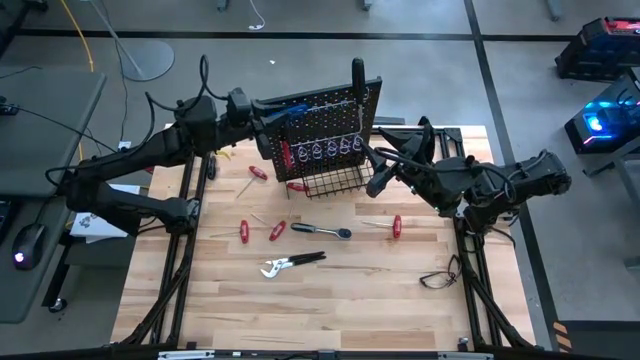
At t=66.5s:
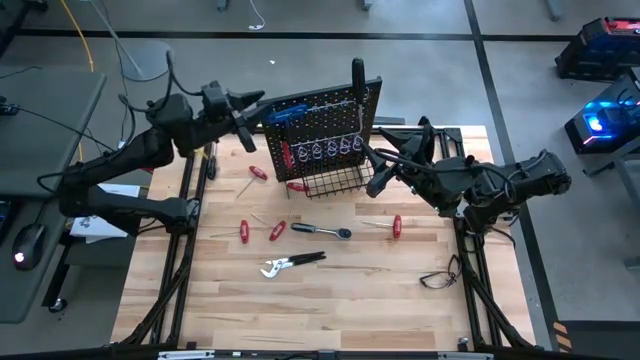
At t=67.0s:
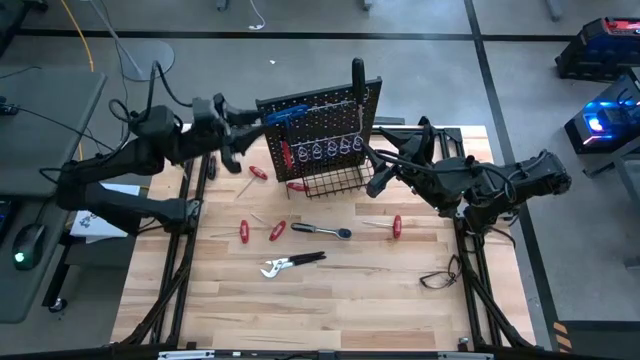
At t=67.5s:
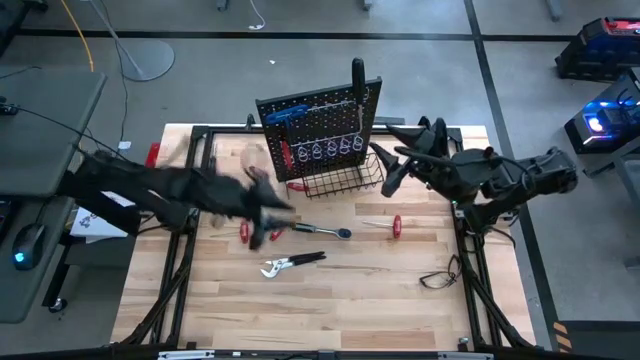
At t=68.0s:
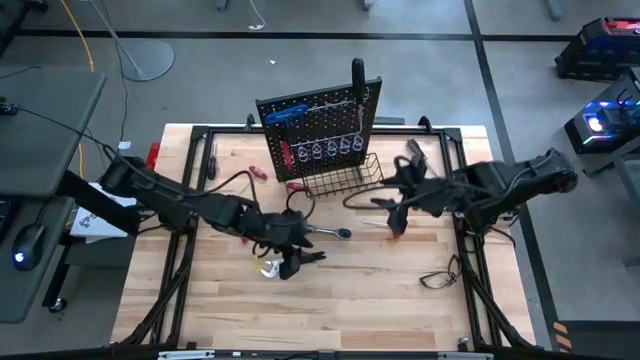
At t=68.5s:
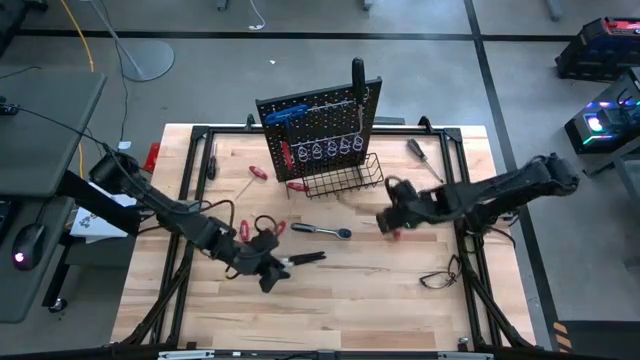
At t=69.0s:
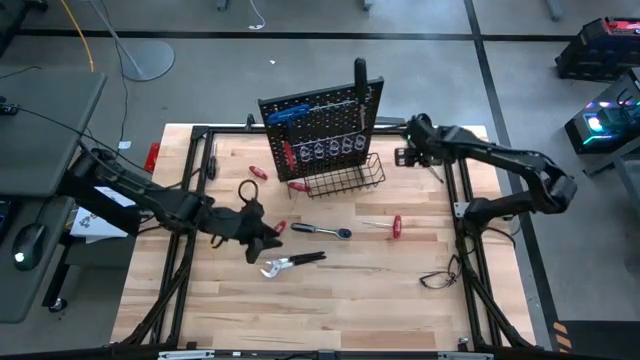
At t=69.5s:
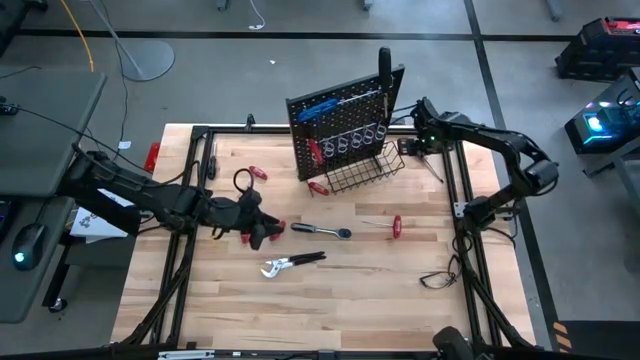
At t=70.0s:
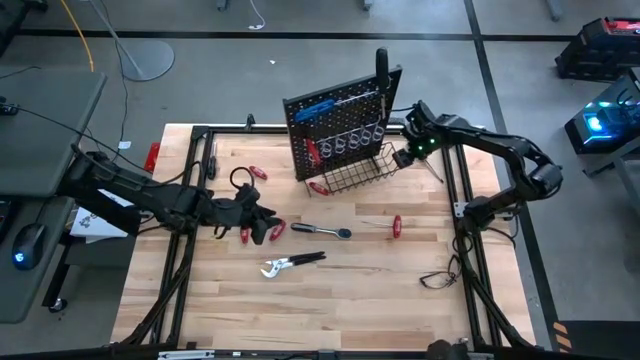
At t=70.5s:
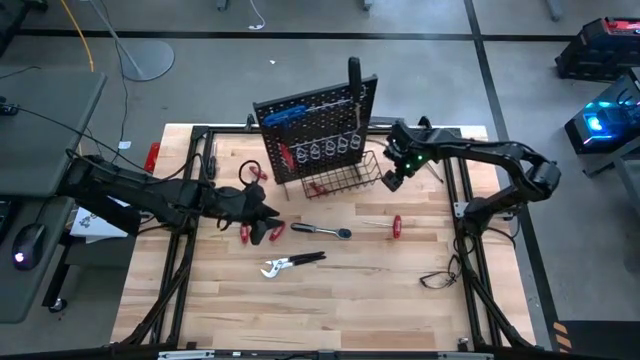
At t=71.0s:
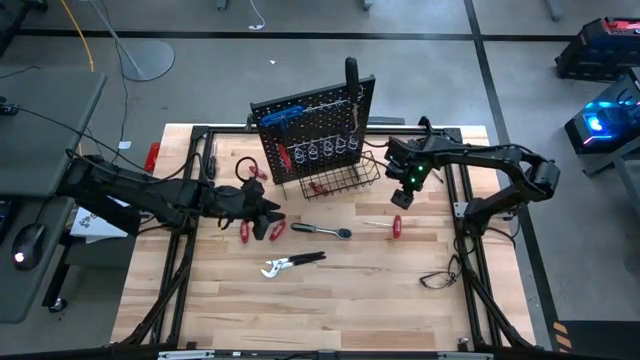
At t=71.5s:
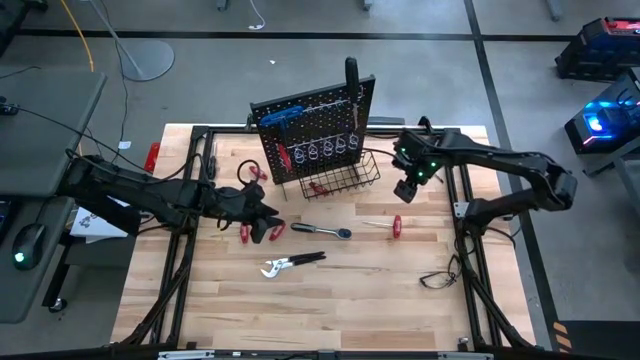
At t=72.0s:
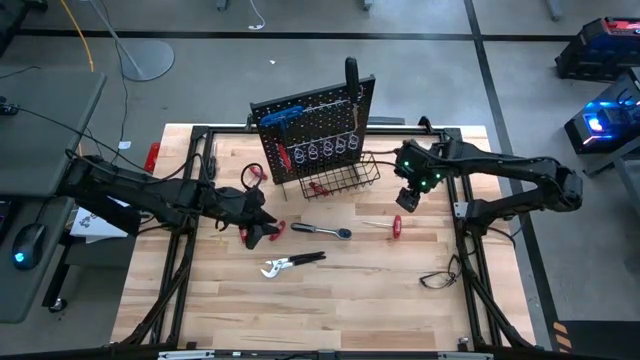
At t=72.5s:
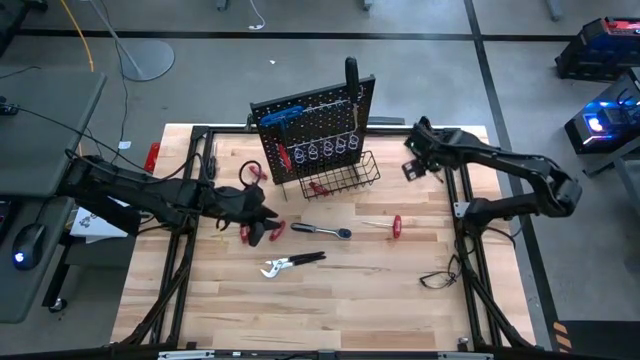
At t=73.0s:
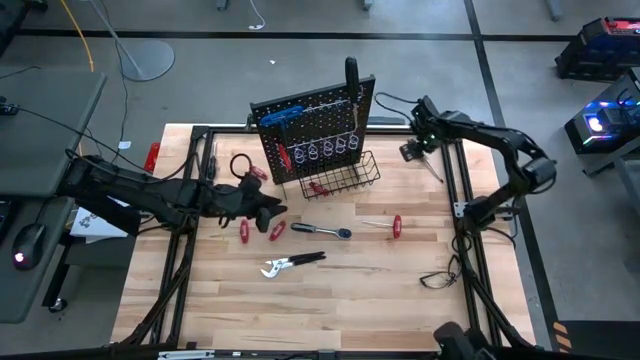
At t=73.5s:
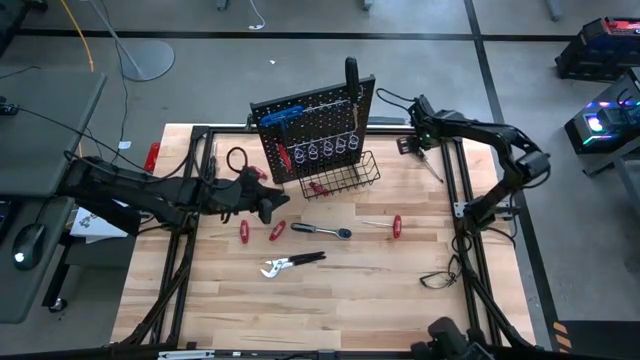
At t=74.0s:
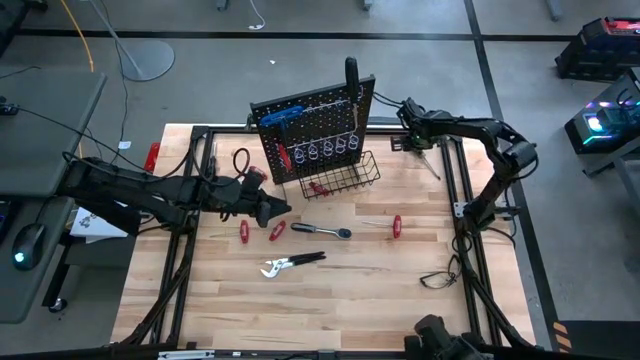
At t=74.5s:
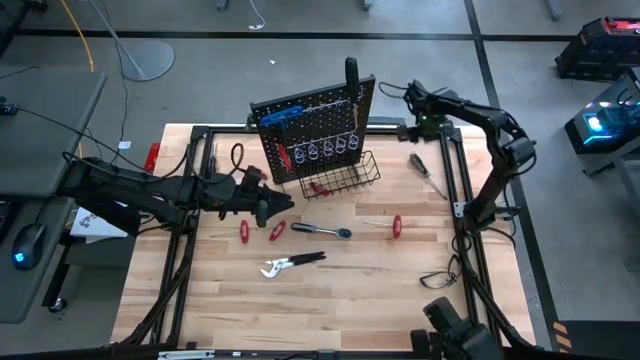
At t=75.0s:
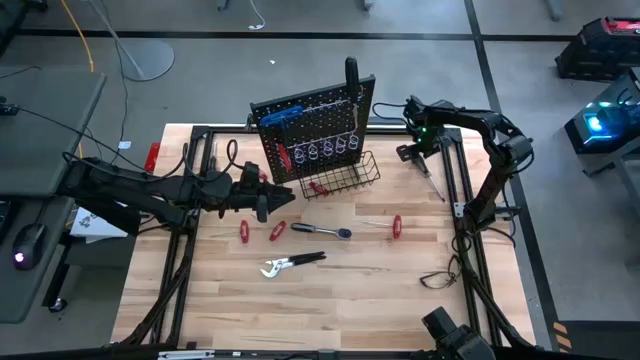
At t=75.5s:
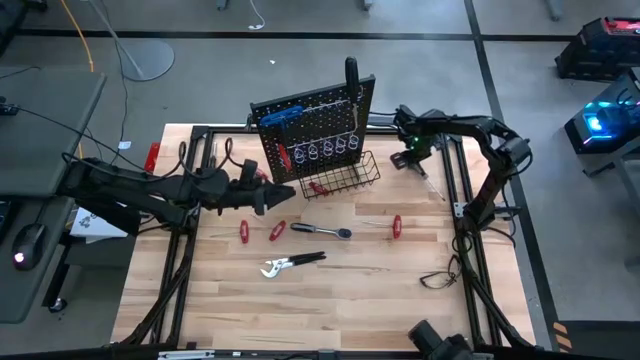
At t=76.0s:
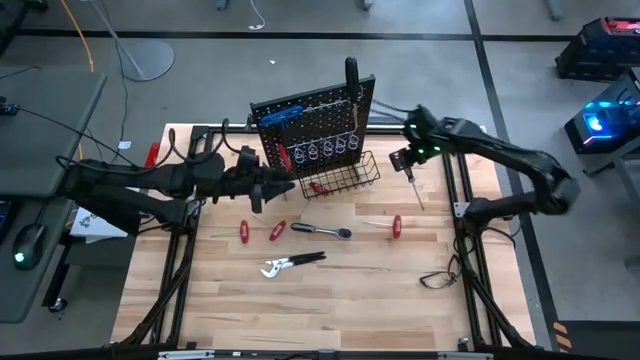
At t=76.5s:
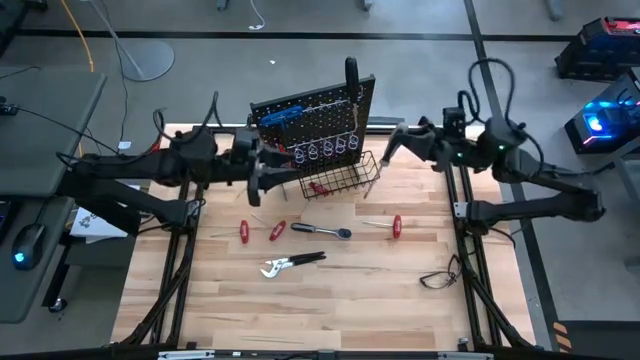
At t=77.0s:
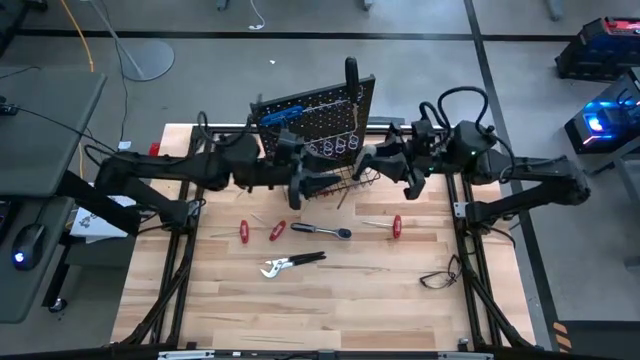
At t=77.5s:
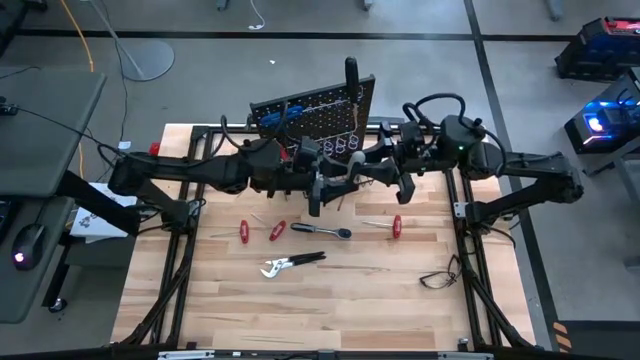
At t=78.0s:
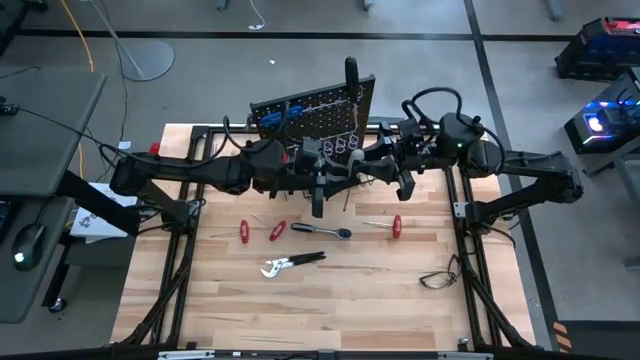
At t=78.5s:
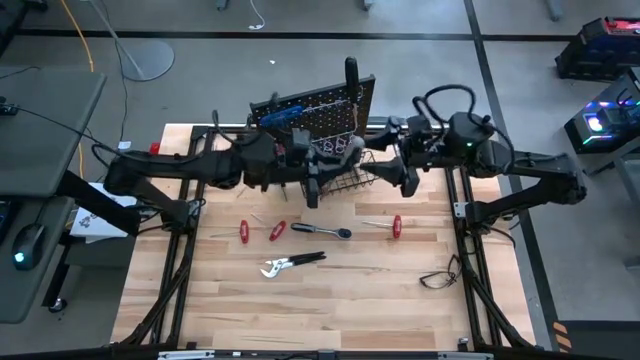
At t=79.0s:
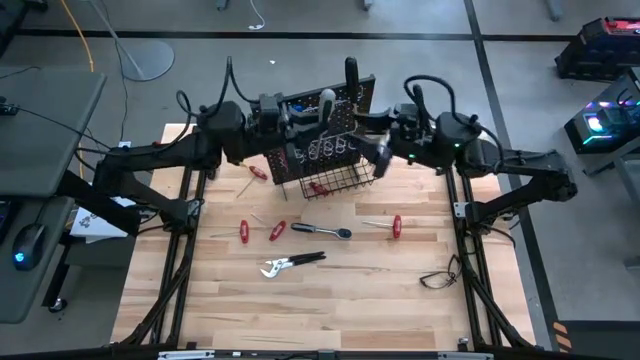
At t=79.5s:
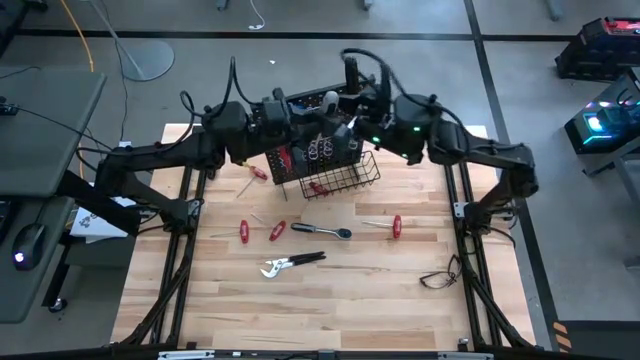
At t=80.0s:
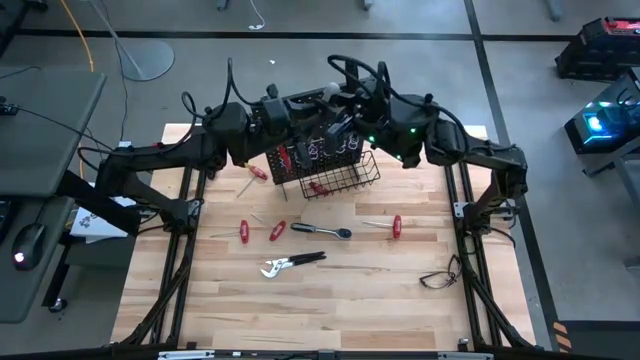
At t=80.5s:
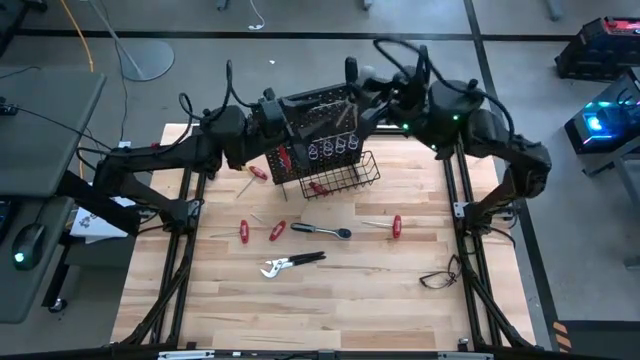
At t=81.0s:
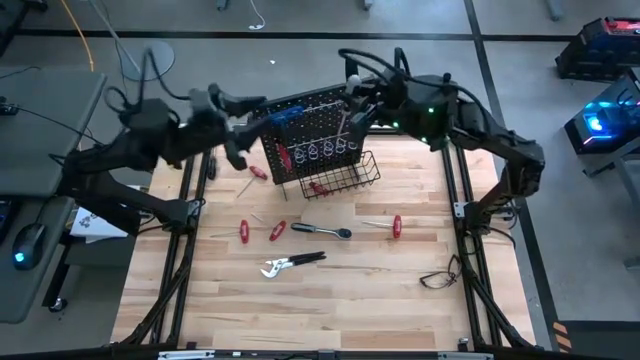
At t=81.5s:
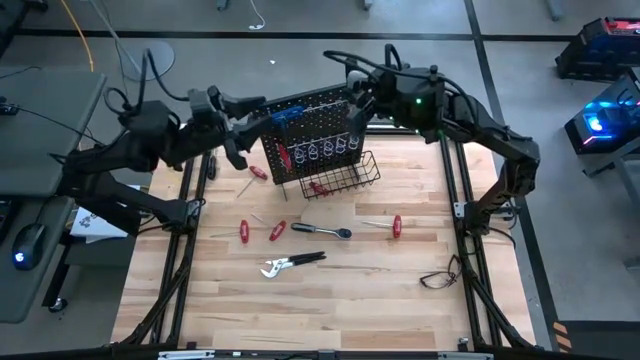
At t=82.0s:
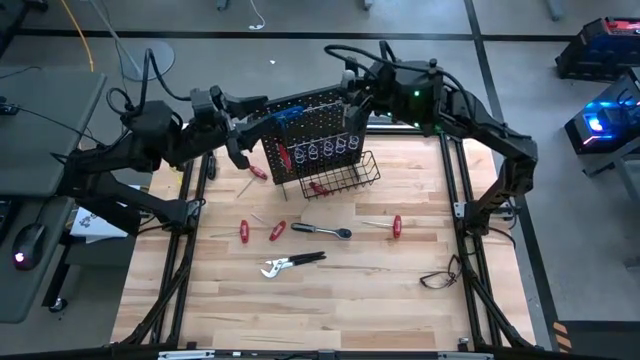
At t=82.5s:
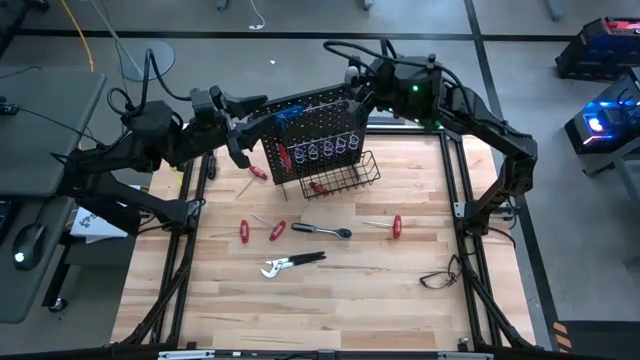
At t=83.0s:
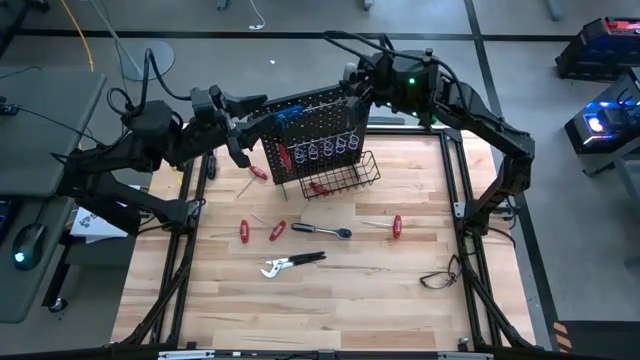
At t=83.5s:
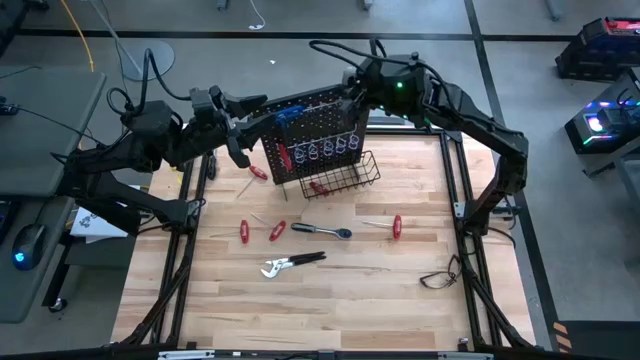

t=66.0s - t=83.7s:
Task: Hang tools onto peg board
Hang the gray screwdriver on the peg board

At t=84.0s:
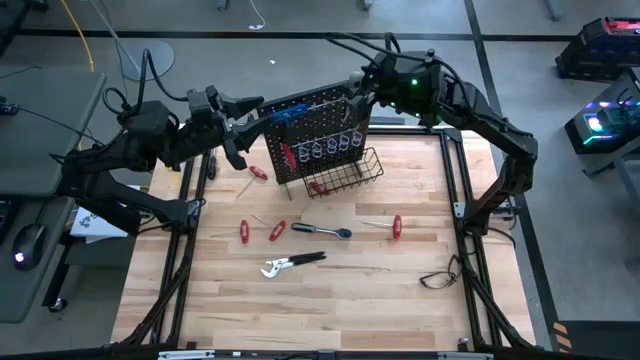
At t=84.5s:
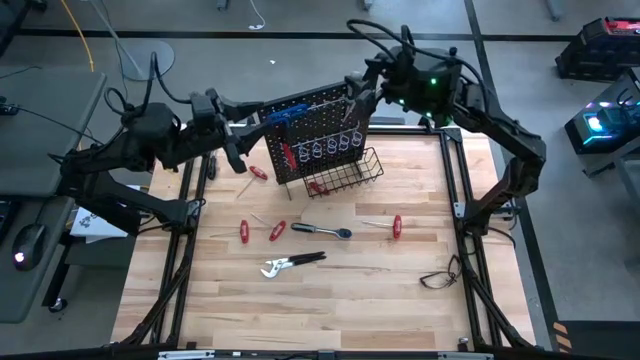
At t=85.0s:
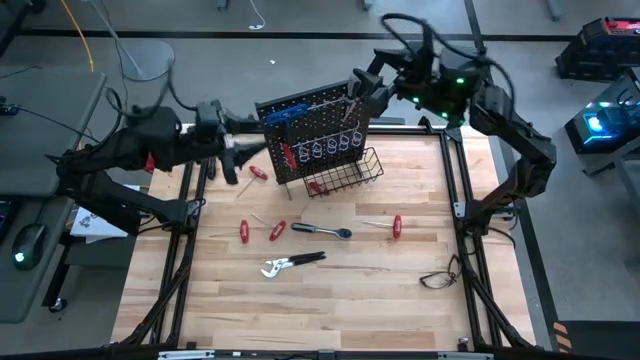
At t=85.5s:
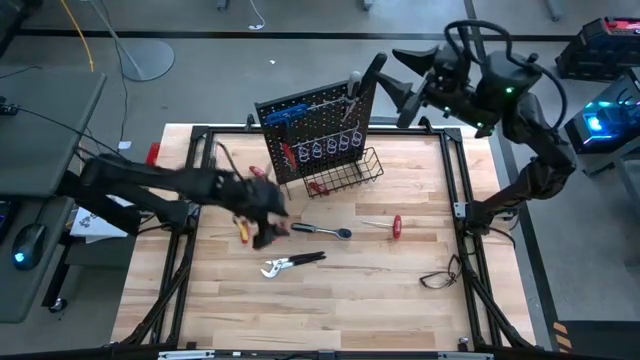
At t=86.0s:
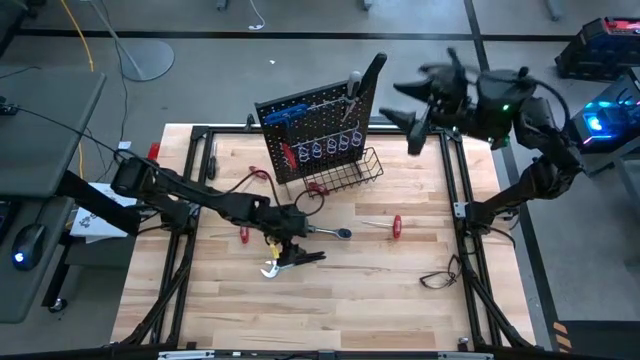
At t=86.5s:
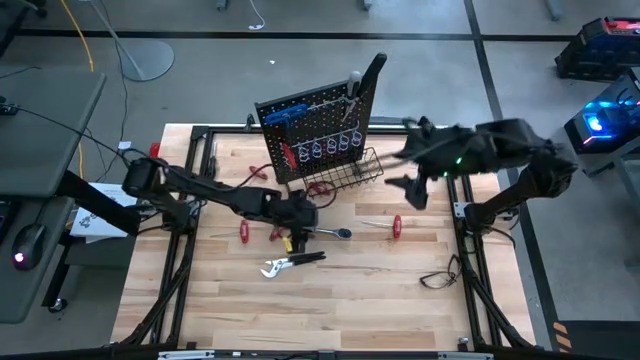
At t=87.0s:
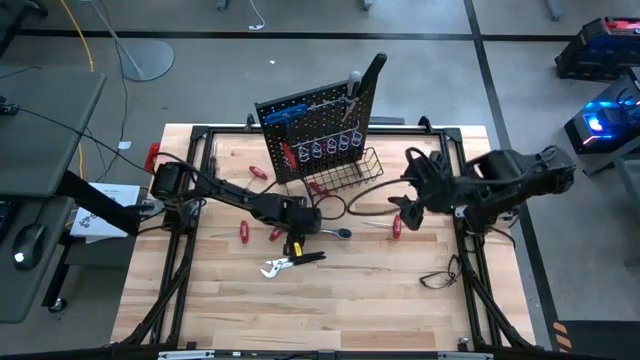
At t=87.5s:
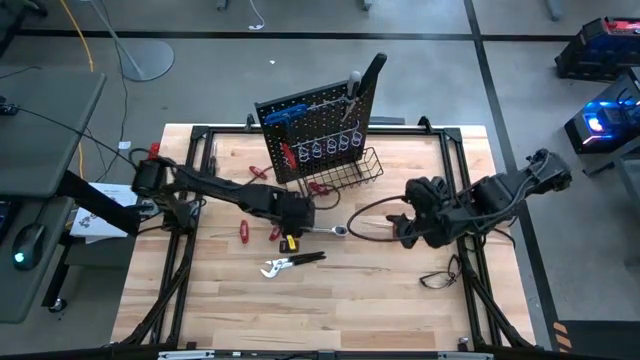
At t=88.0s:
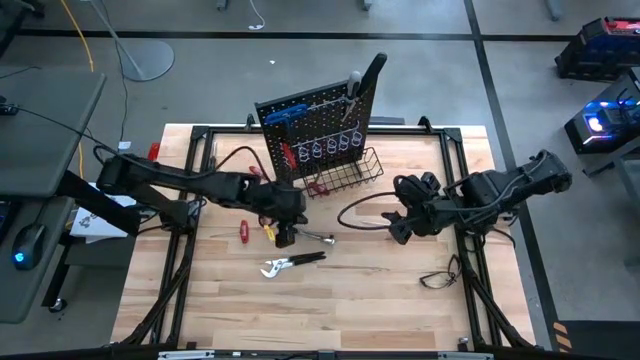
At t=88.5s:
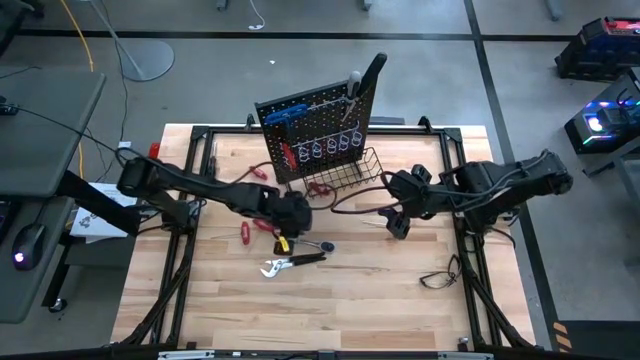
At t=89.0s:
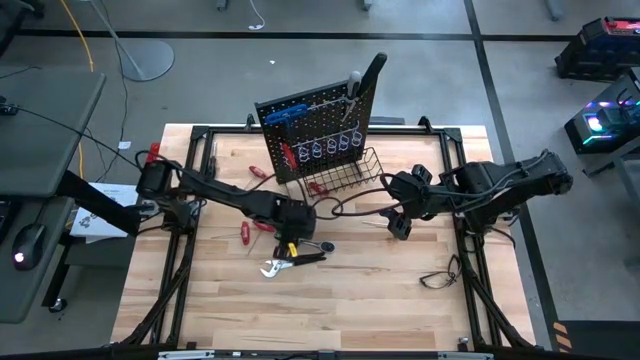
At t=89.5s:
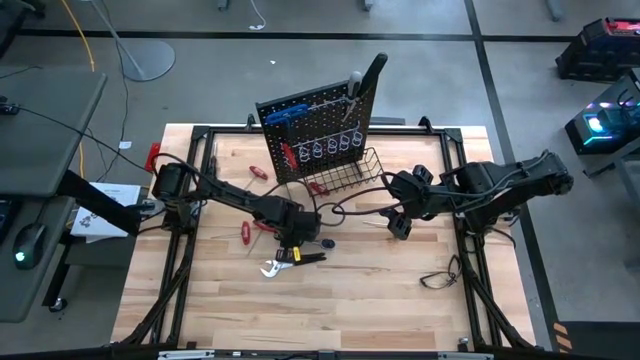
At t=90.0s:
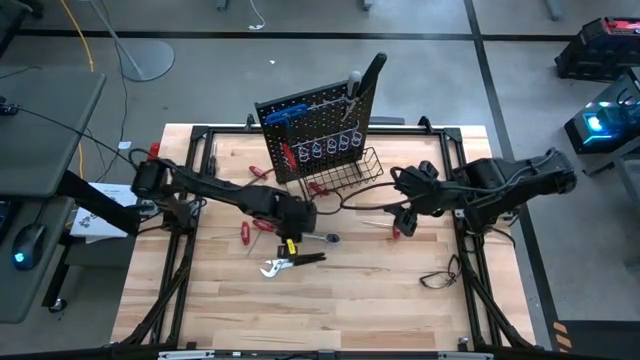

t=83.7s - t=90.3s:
Put the gray ratchet wrench into the wire basket on the peg board
